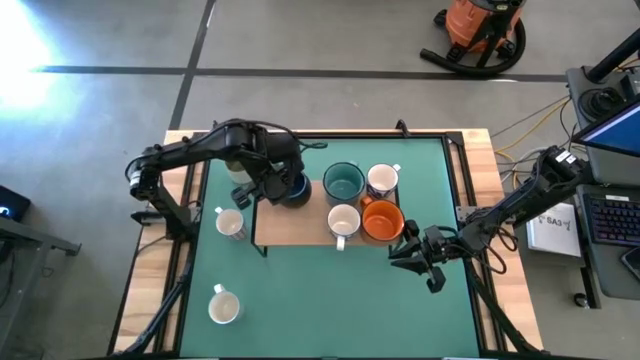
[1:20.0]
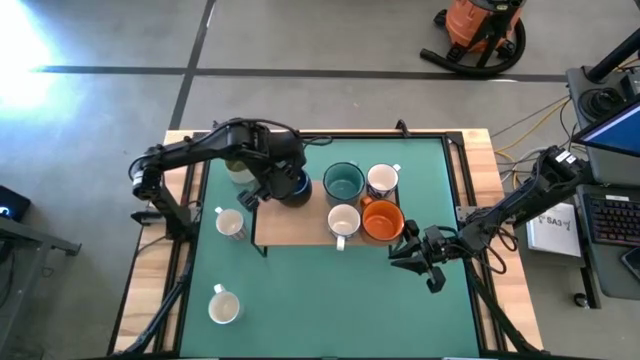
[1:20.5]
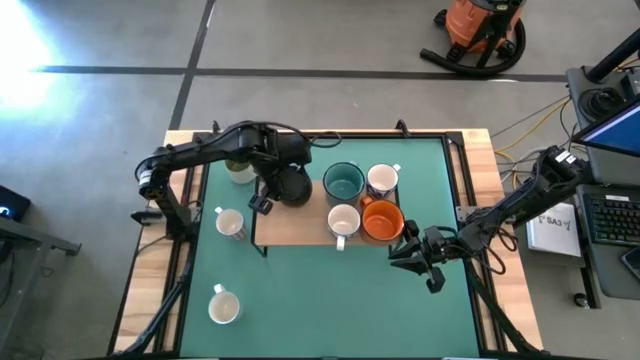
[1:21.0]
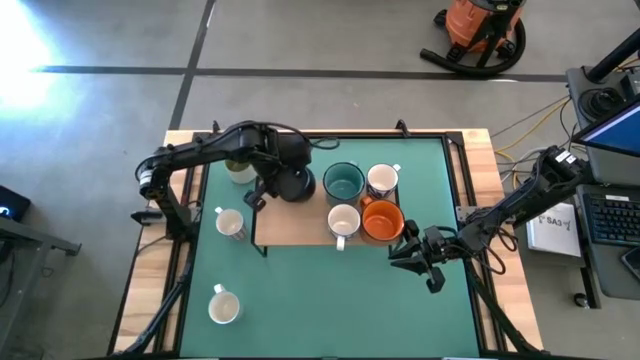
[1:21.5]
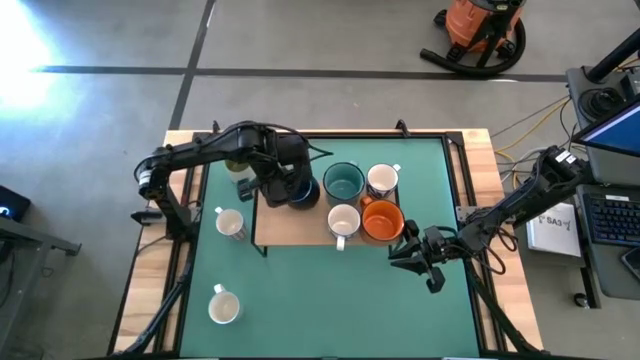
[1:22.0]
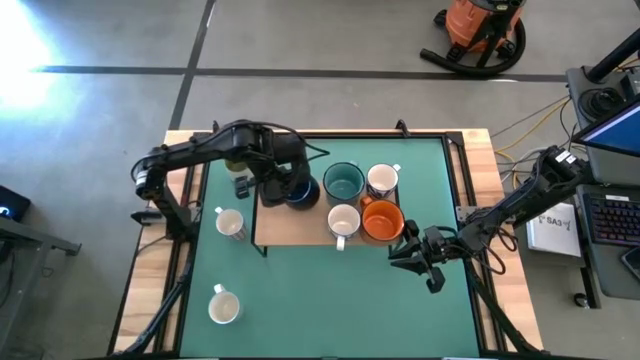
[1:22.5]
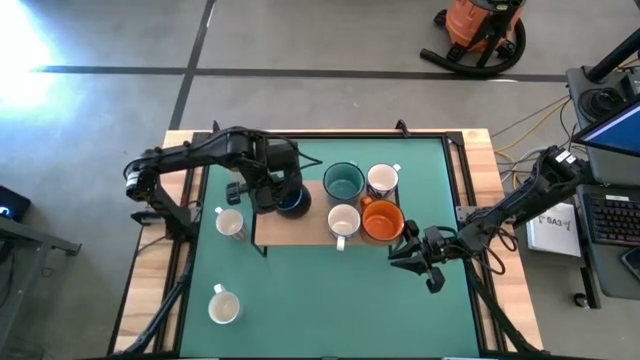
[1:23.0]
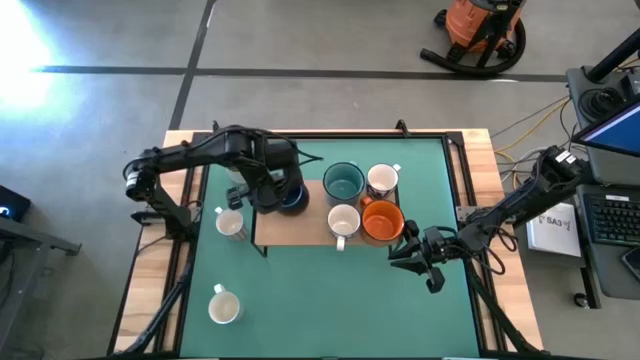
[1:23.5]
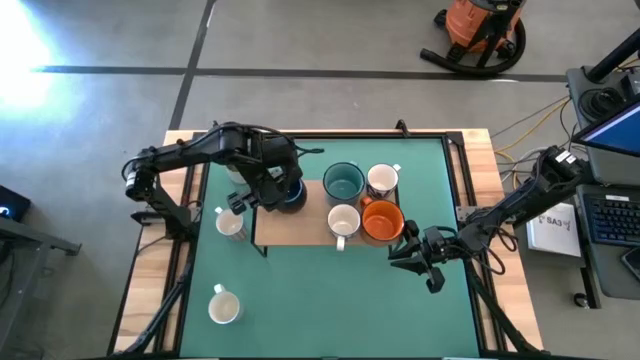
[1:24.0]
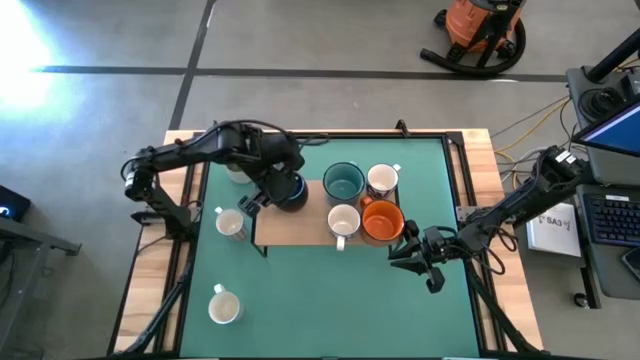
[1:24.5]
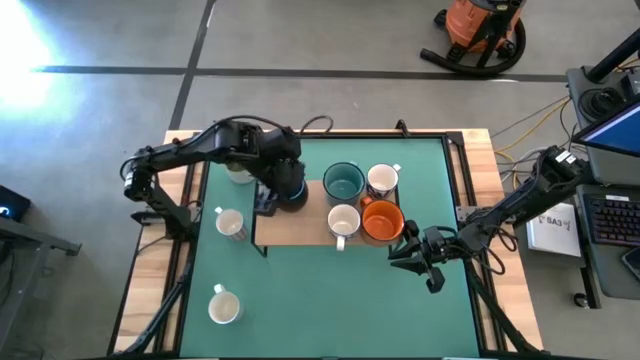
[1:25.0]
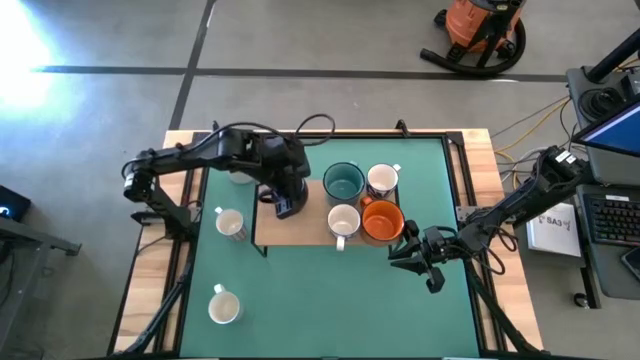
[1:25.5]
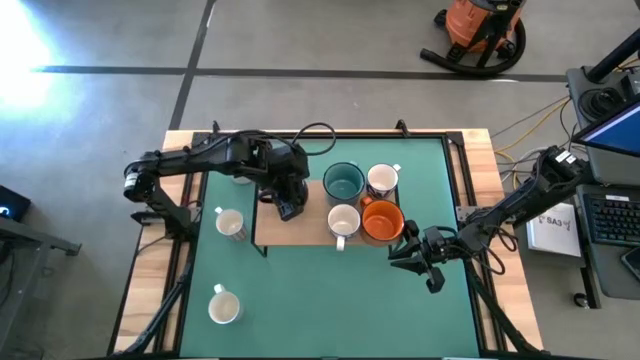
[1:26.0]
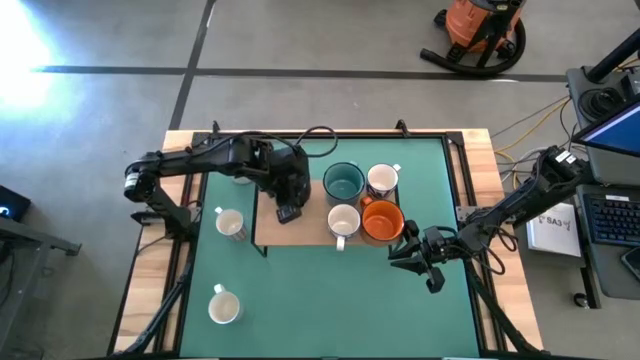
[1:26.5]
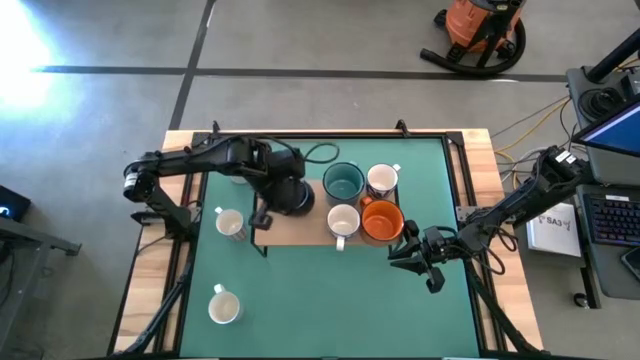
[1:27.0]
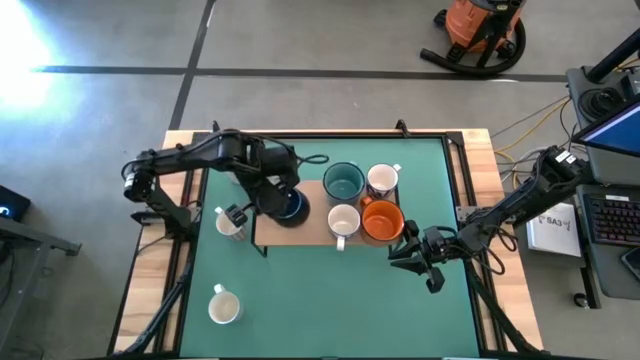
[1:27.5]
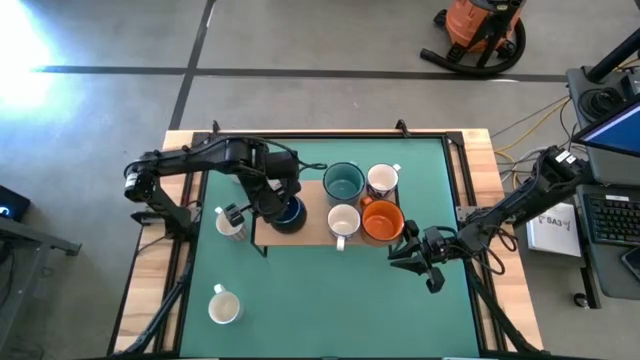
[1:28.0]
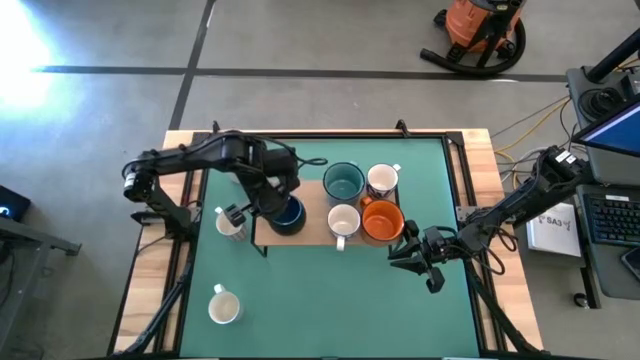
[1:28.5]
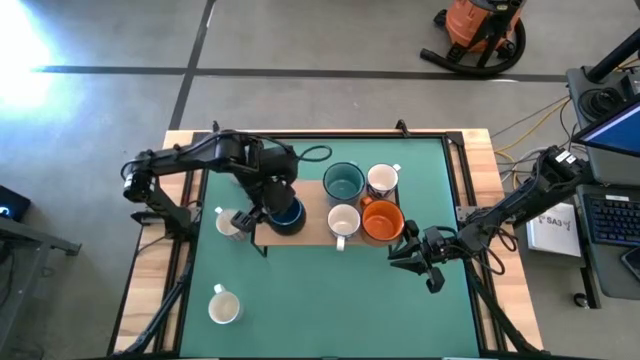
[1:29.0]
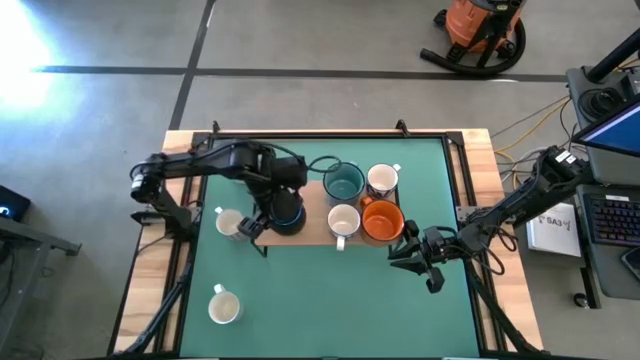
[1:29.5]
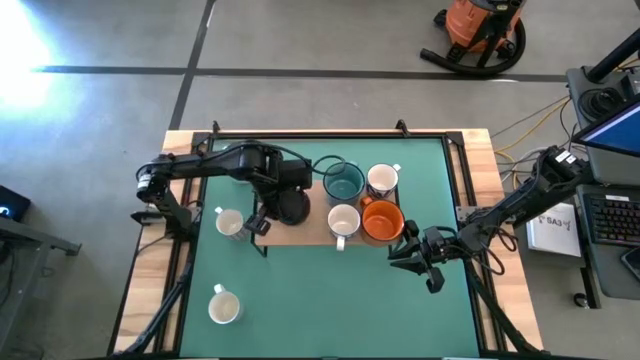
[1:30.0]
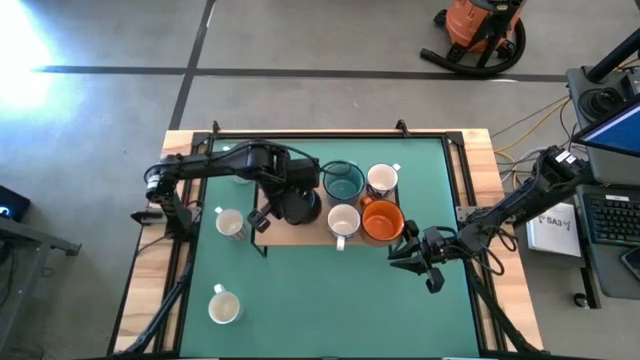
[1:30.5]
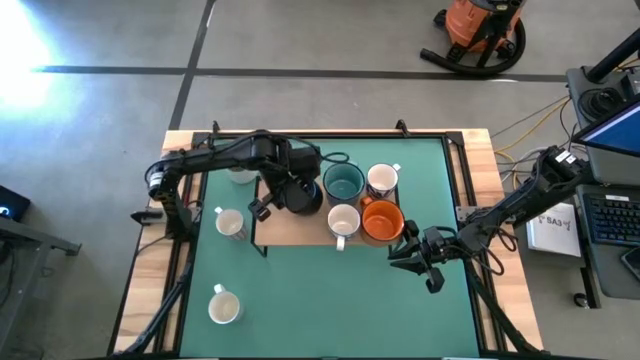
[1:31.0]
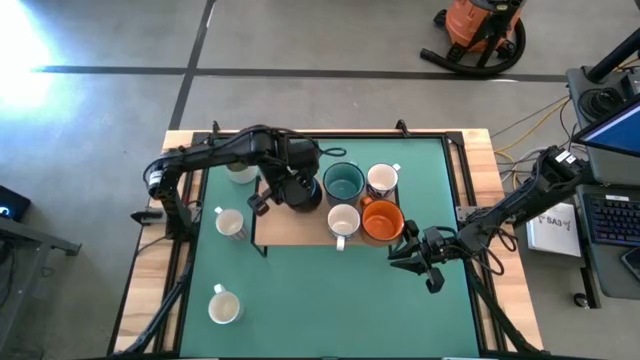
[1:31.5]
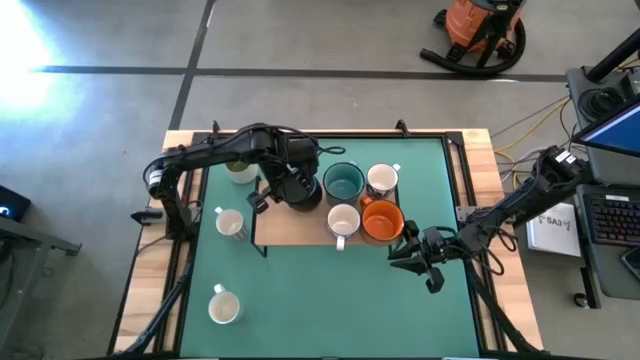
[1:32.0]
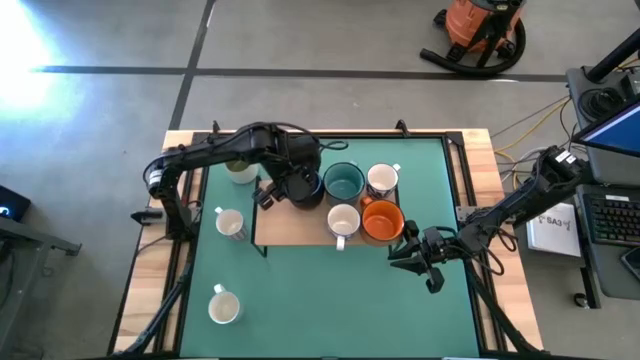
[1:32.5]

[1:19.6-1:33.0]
Task: Place coffee mugs
Put the black blue mug on the shelf

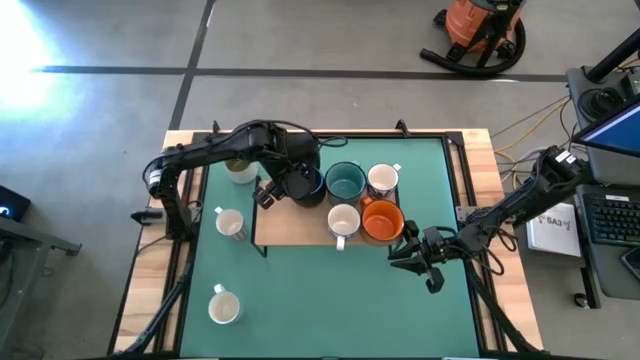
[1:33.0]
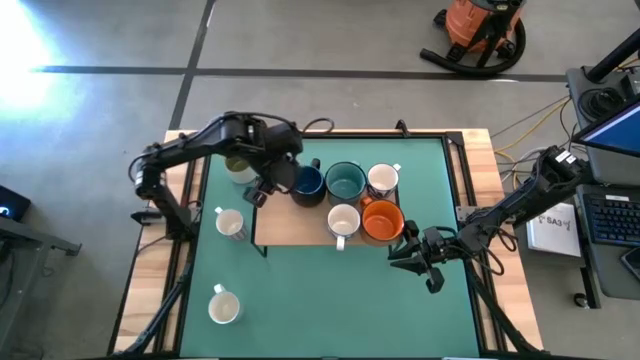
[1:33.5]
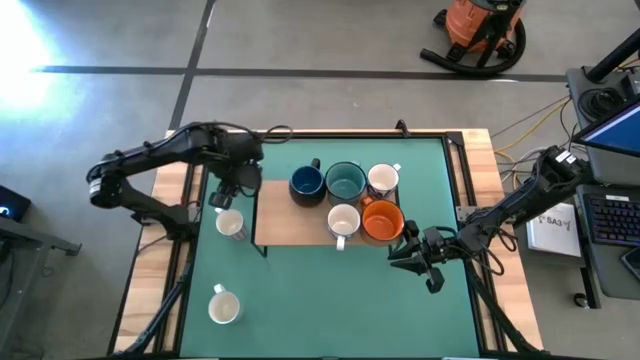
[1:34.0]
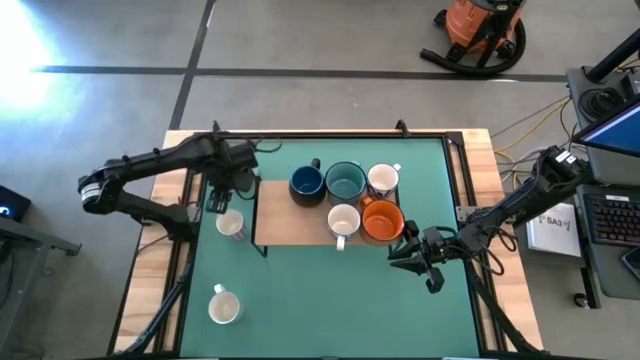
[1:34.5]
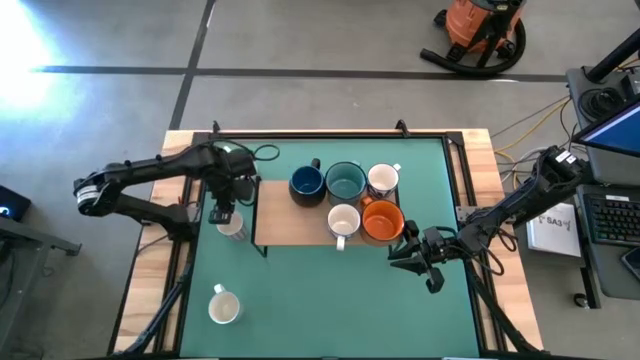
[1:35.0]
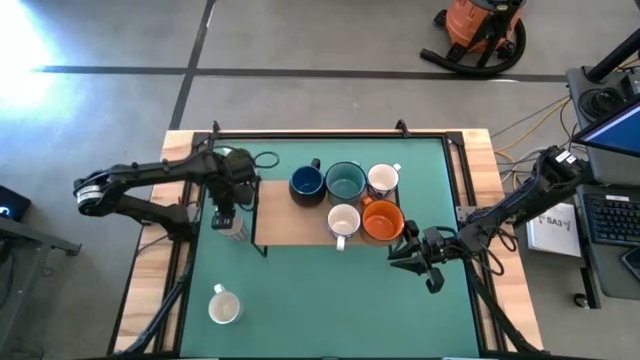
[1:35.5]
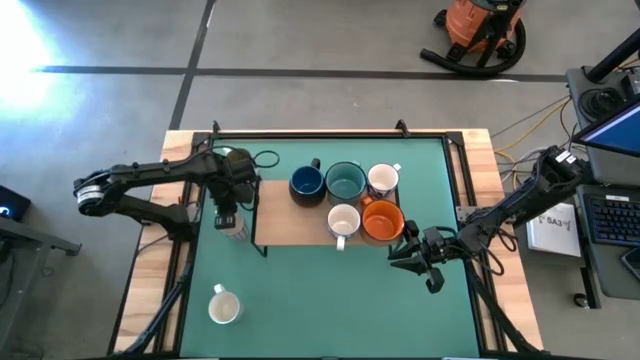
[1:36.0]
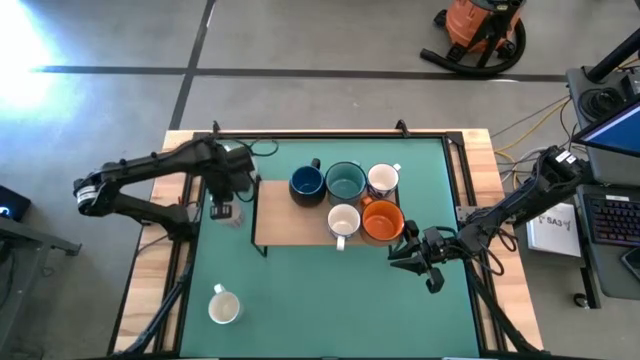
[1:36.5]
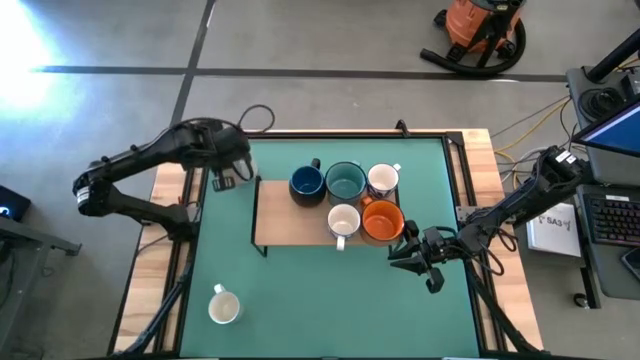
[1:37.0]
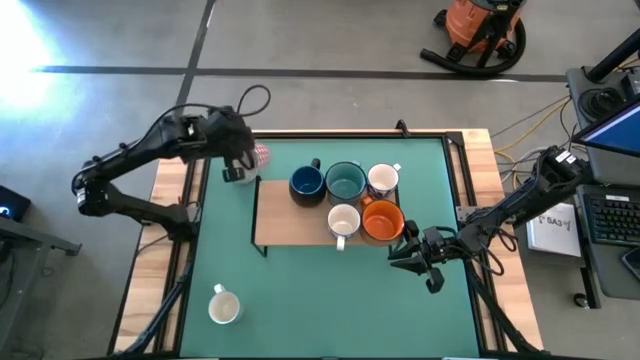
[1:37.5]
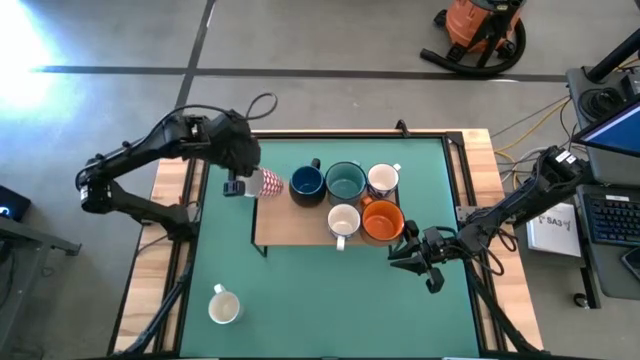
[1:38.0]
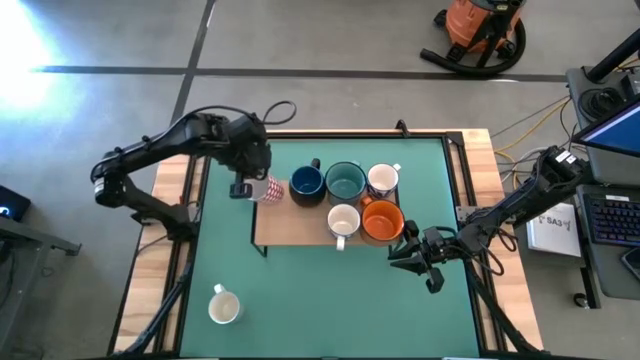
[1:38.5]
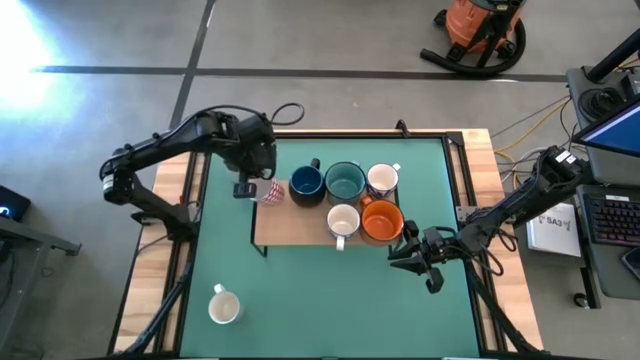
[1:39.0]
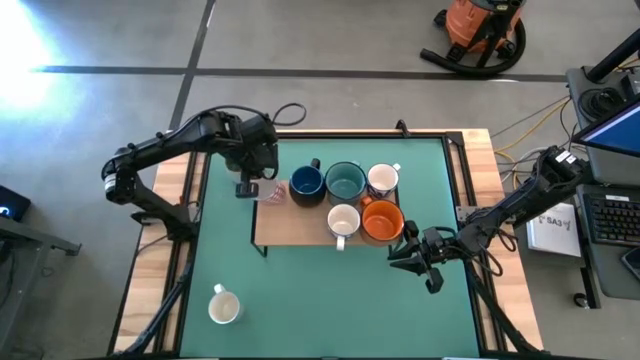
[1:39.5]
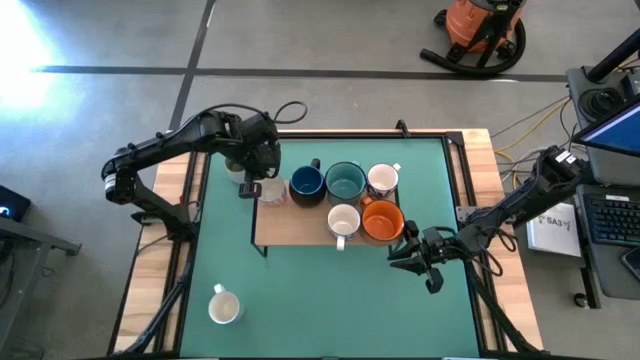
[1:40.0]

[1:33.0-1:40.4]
Put the white red patterned mug on the shelf

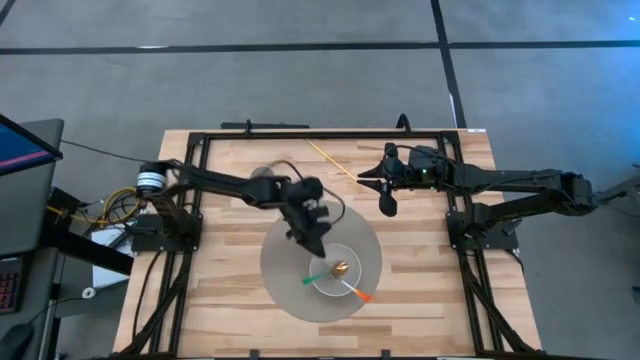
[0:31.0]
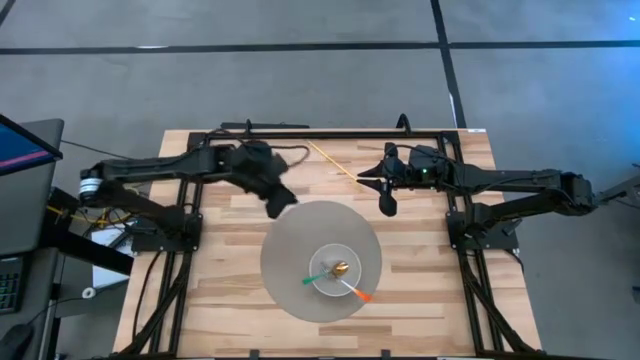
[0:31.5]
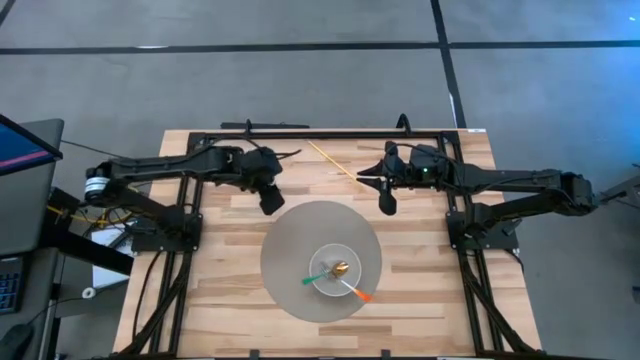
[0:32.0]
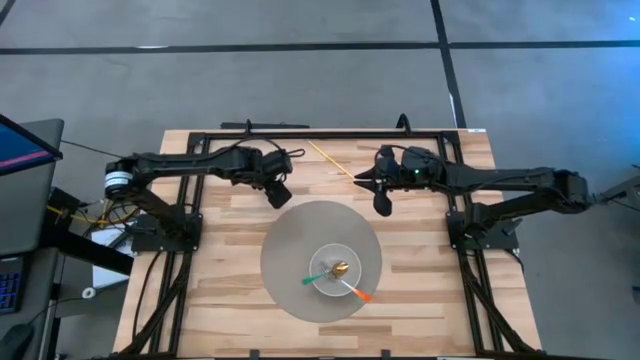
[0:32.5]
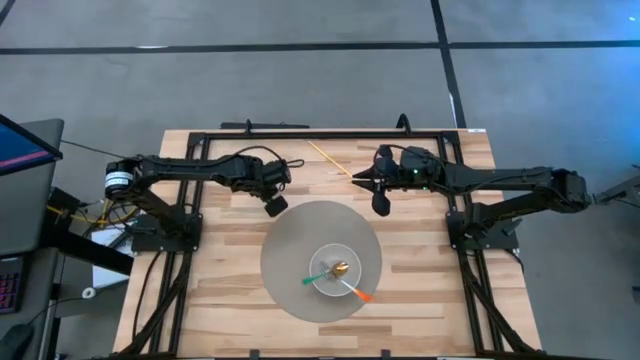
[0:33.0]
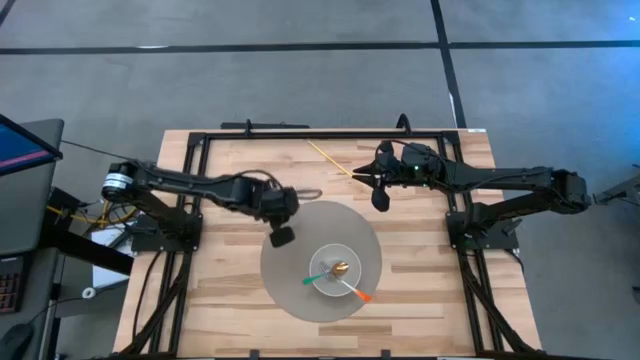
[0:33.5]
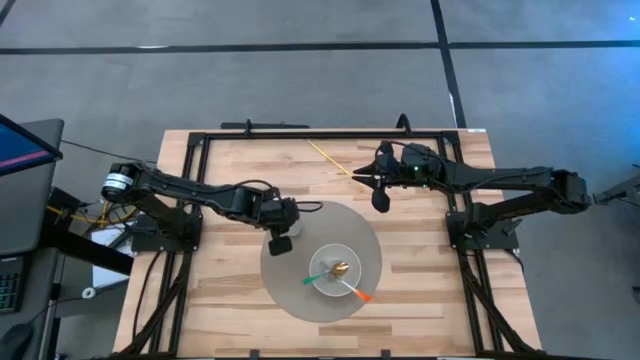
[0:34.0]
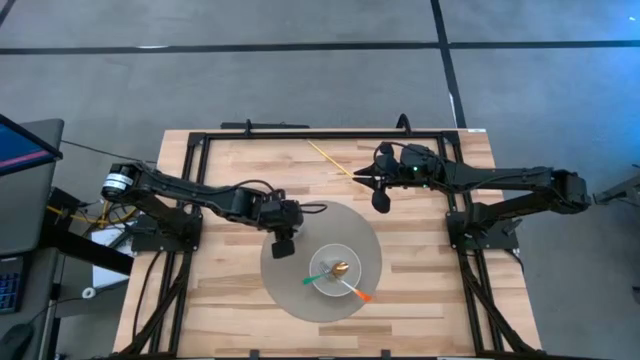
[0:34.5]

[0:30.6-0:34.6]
Task: Pick & Place Utensil
Put the gray cup on the gray mat to the top left of the gray bowl
